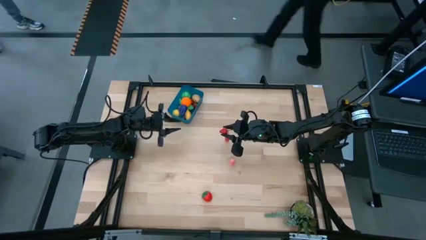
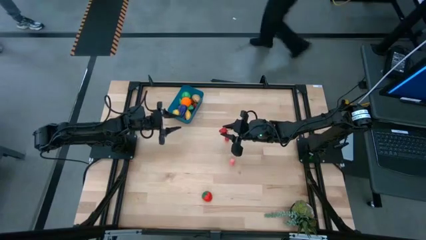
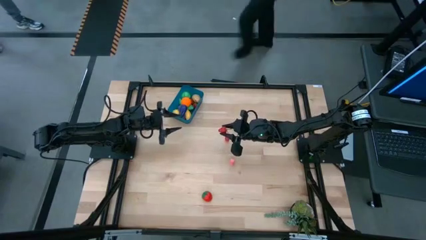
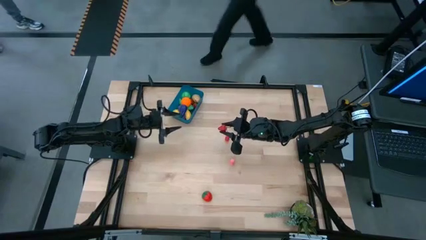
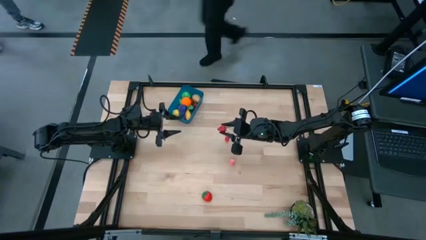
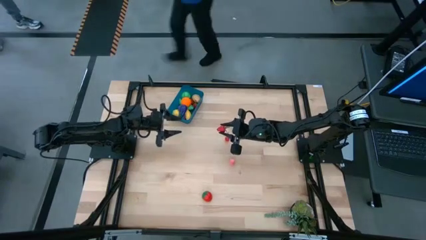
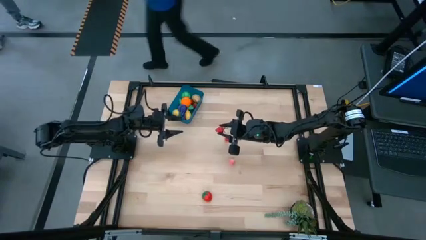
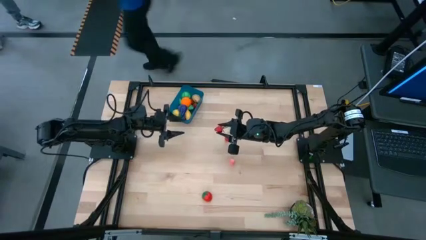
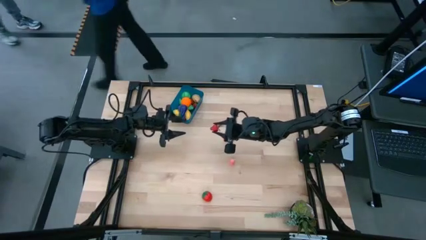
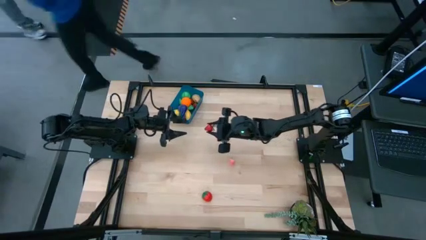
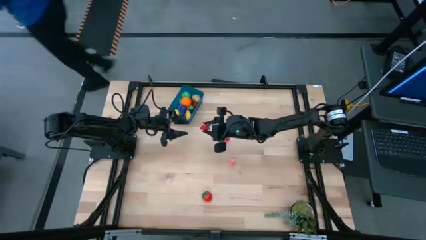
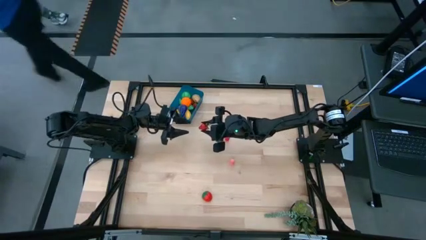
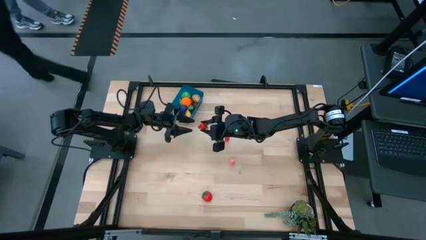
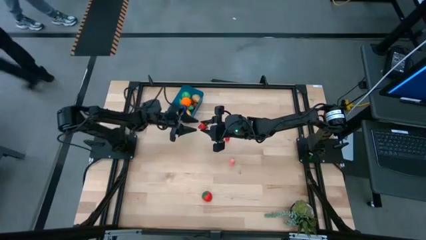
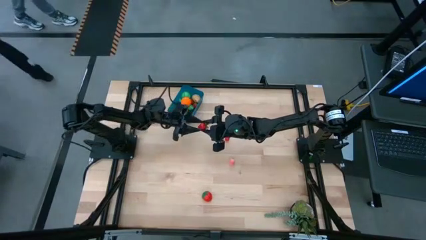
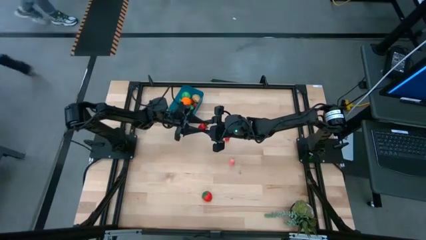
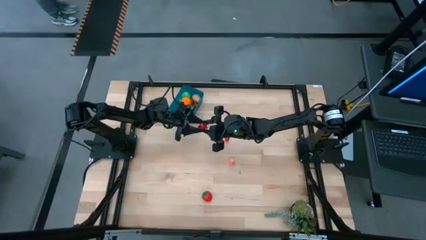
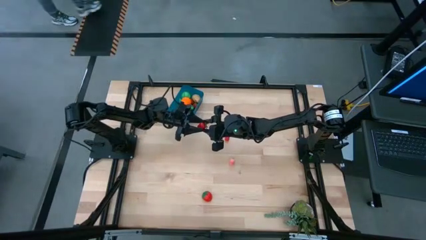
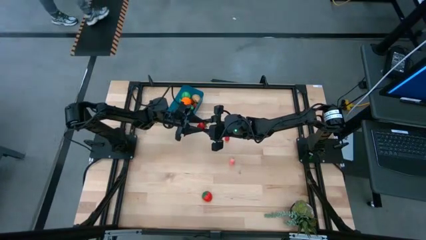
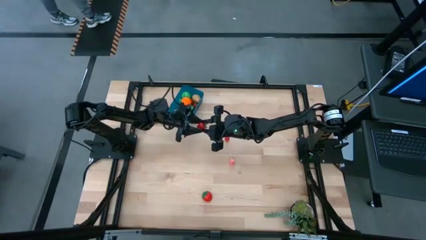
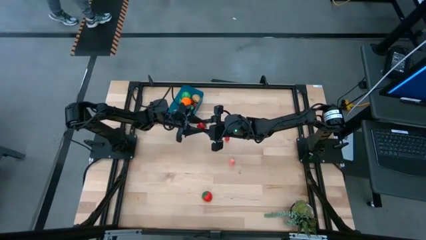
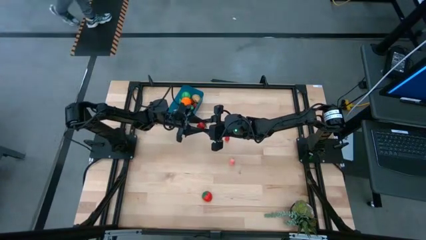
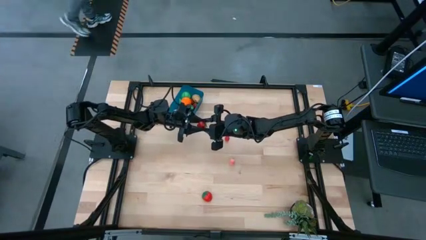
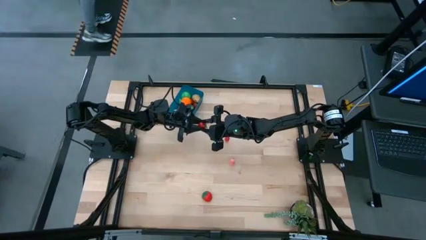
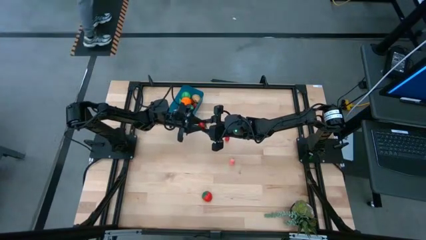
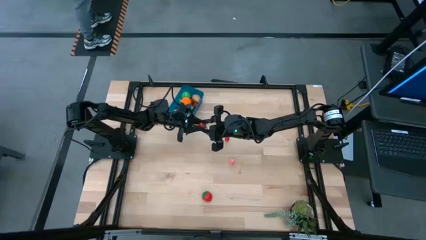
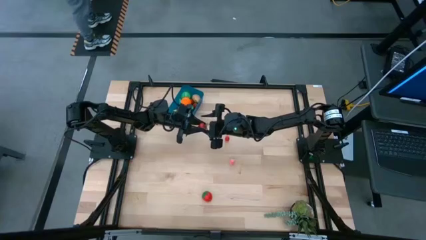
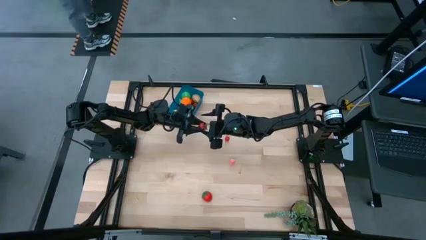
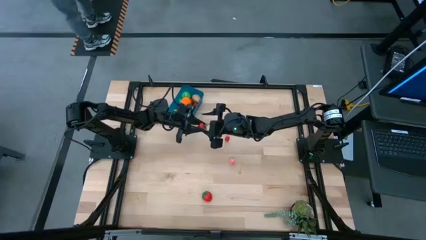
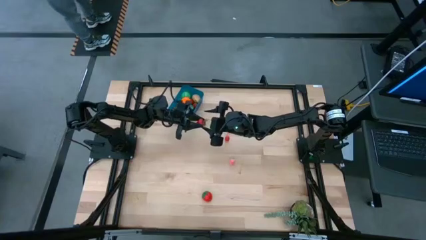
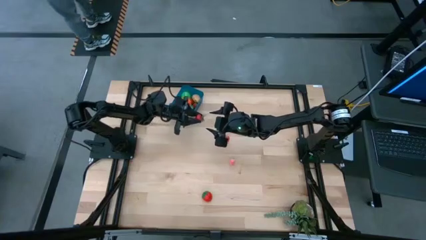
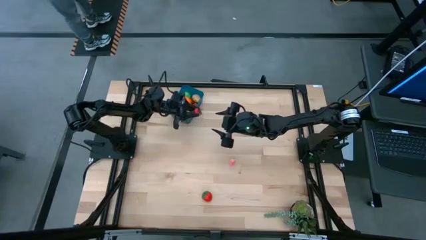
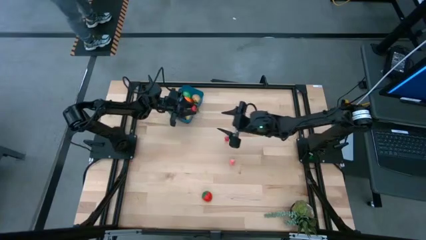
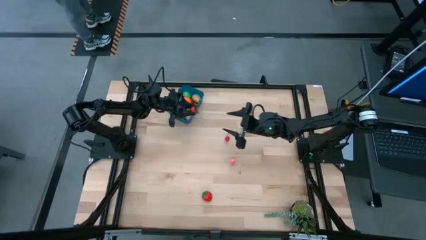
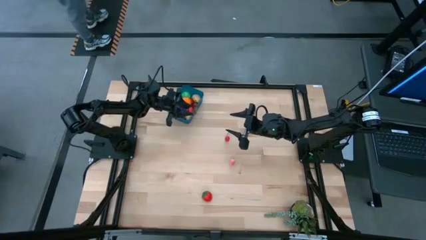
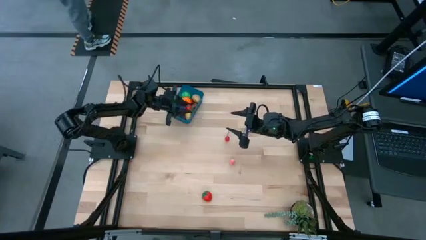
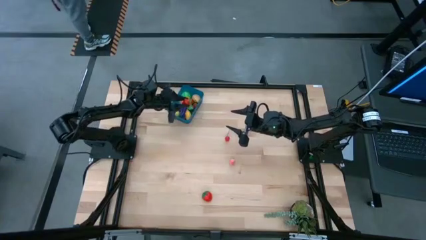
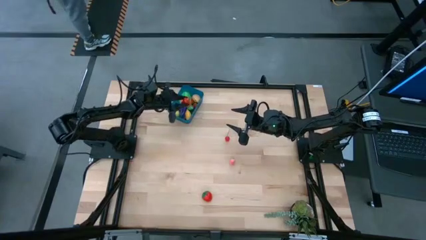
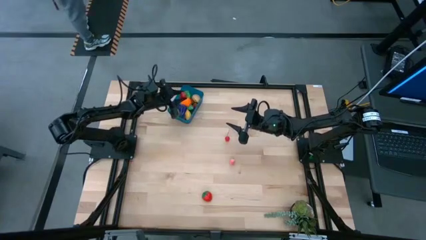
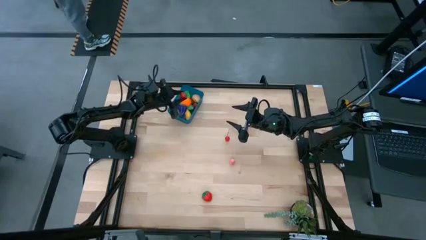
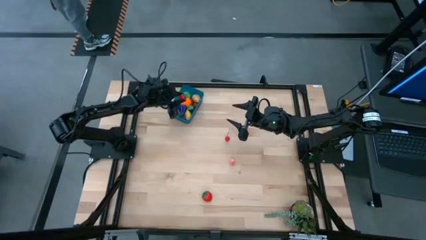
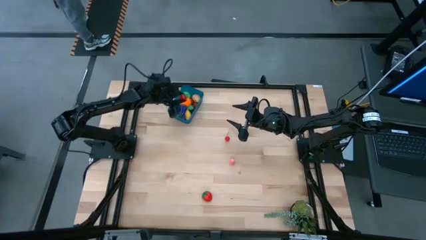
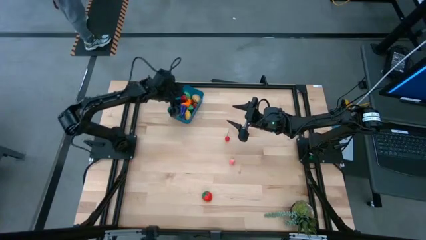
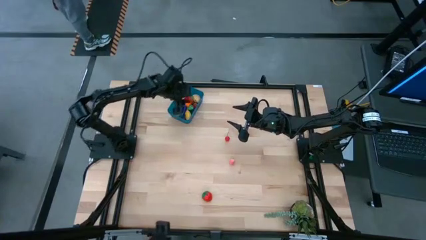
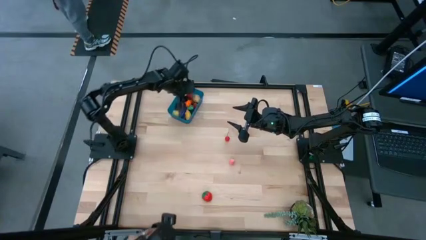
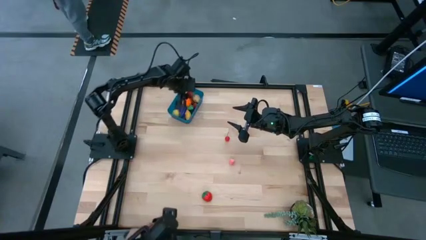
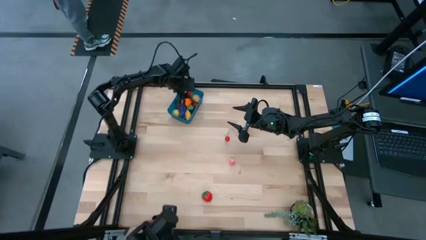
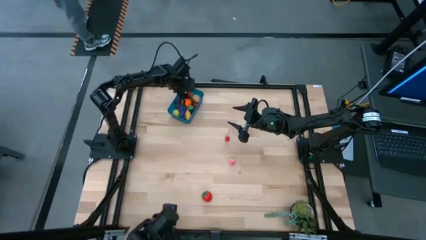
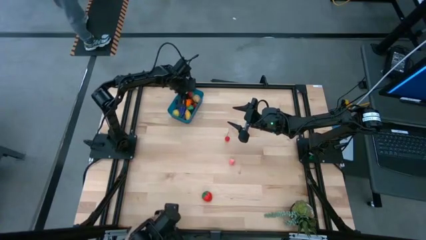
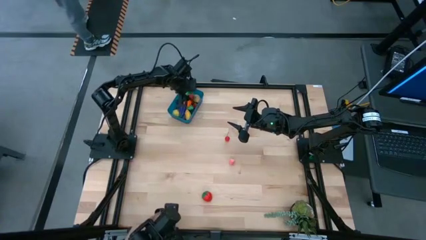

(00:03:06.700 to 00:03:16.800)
Task: Pick and placing Produce into tupperware
Put the top right red strawberry into the blue bin

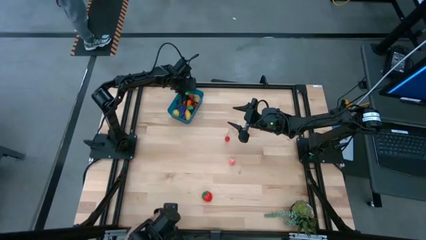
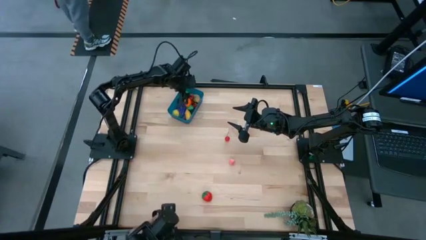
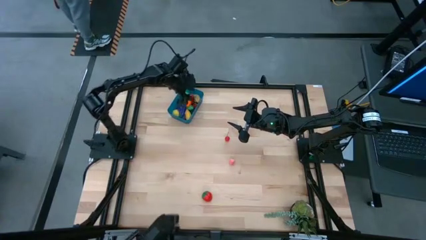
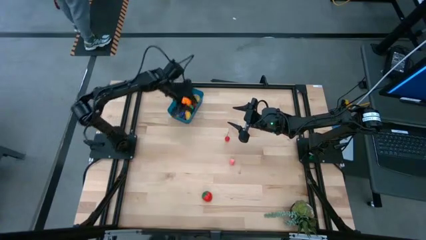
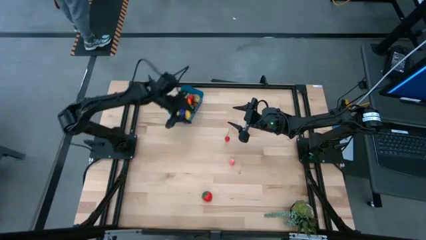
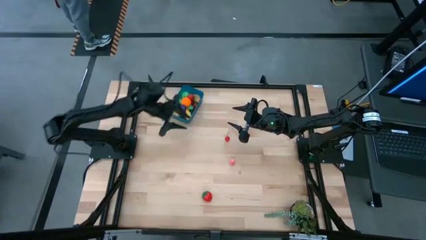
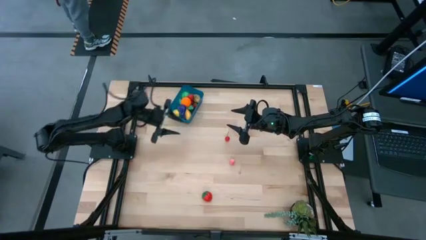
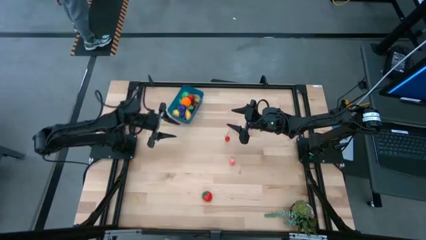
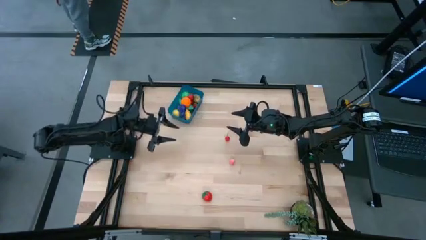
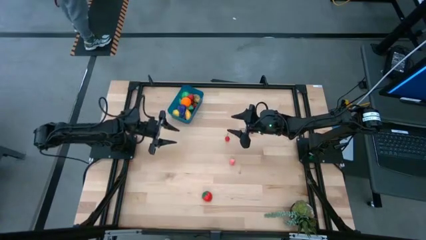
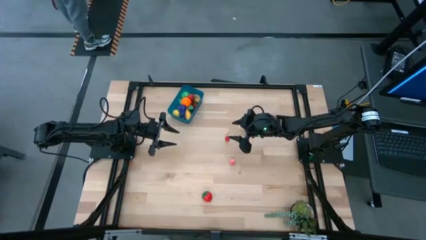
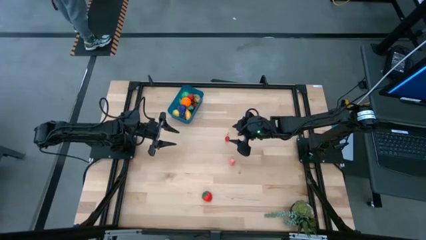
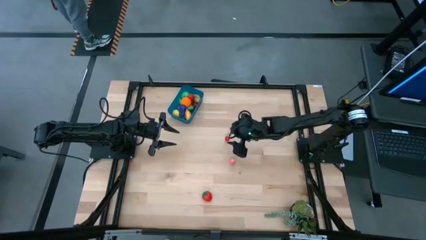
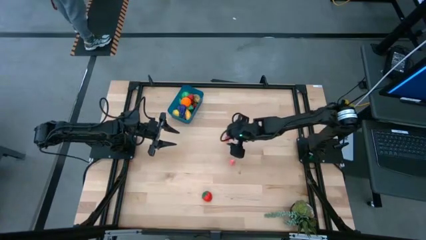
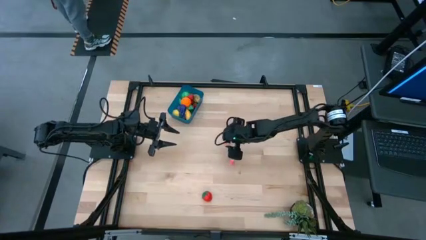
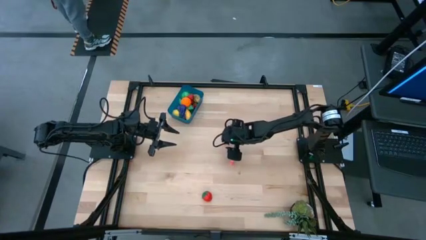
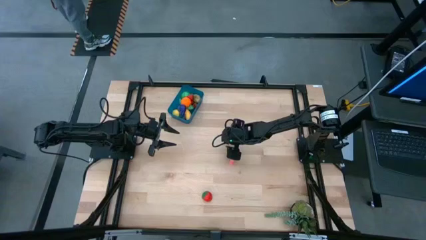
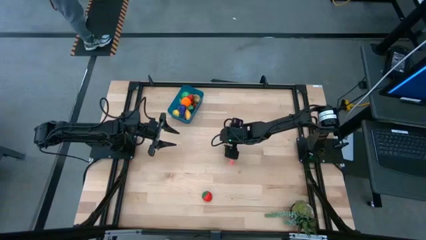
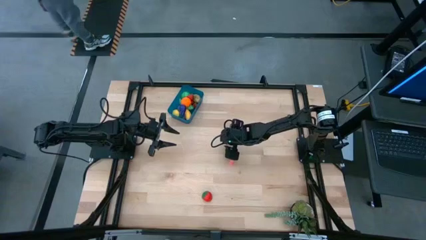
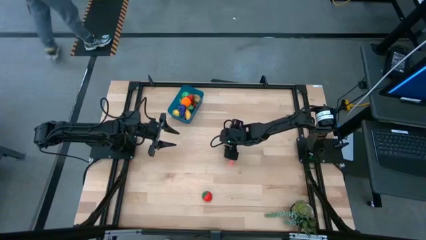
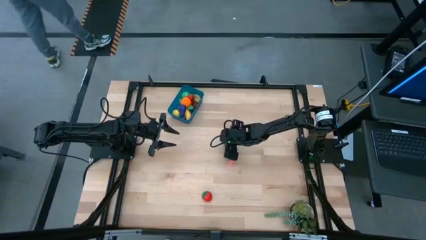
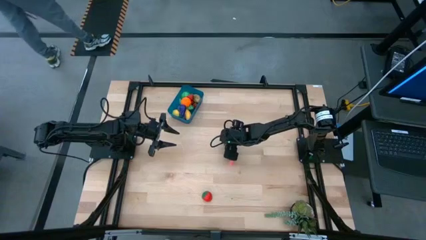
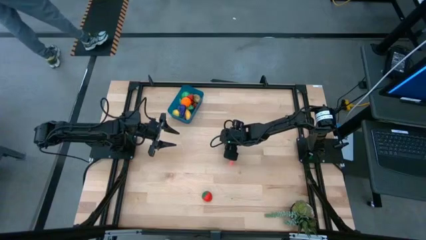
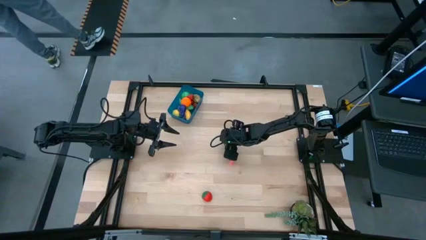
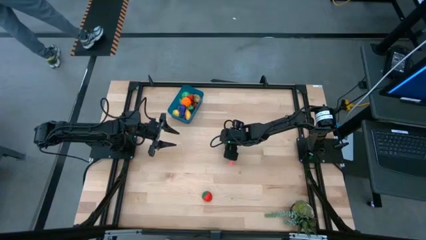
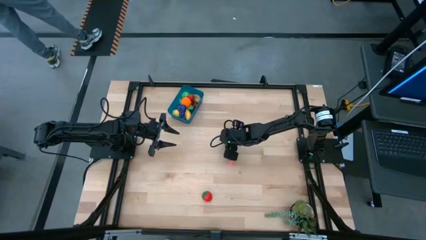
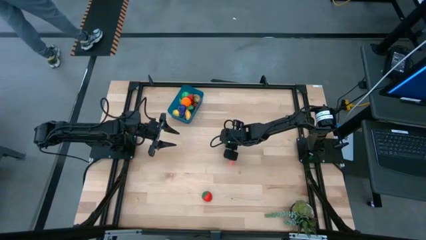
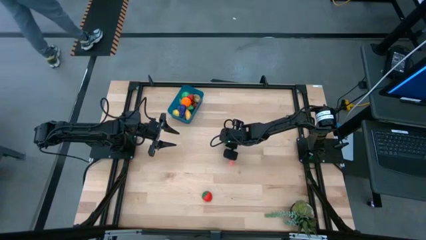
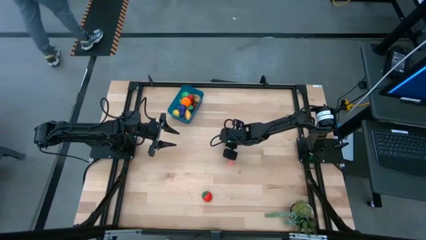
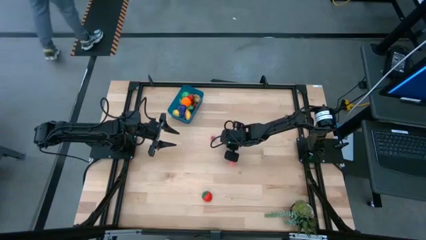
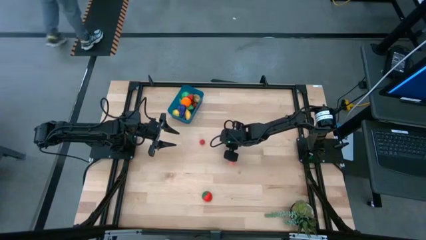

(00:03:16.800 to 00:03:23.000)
Put the red cherry into the blue bin
